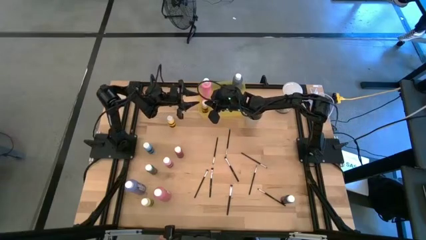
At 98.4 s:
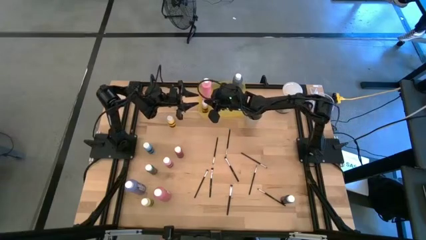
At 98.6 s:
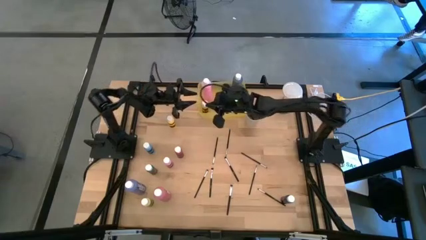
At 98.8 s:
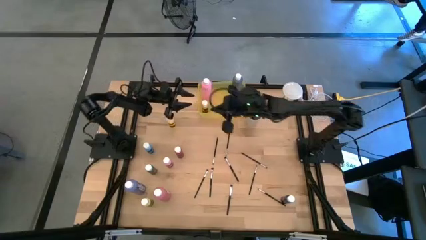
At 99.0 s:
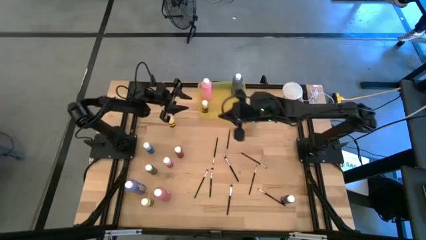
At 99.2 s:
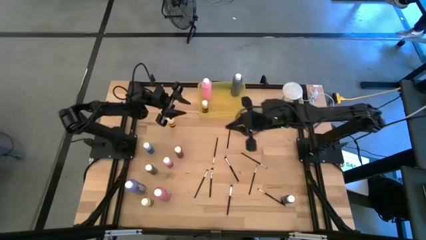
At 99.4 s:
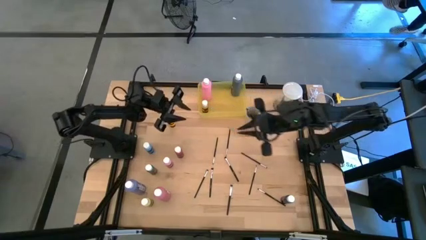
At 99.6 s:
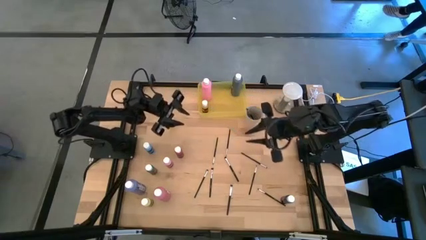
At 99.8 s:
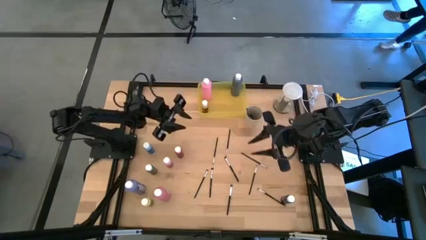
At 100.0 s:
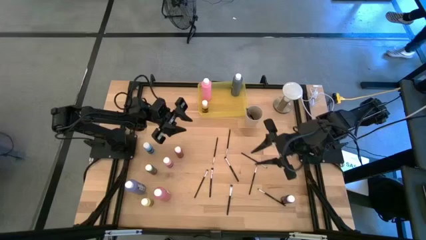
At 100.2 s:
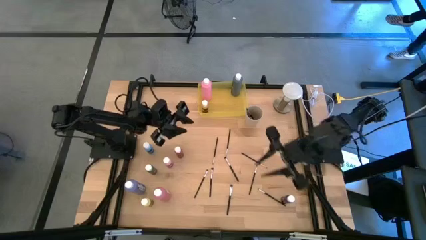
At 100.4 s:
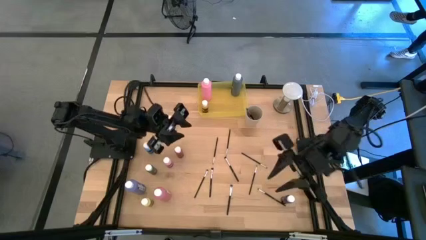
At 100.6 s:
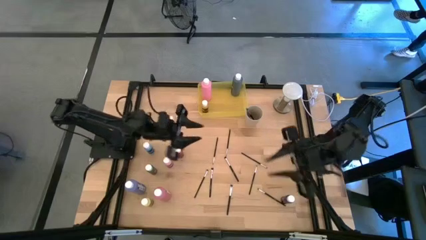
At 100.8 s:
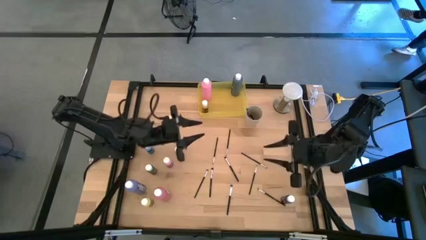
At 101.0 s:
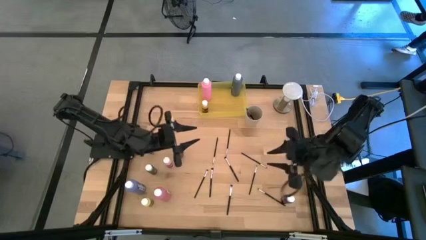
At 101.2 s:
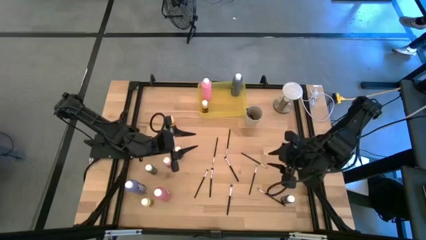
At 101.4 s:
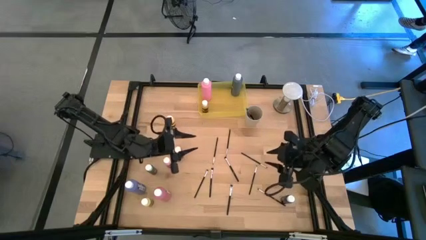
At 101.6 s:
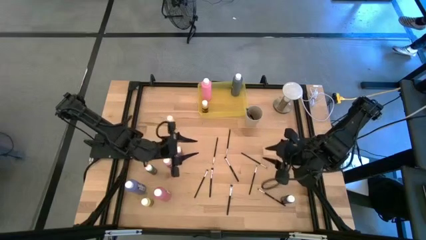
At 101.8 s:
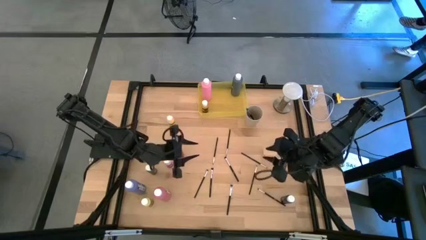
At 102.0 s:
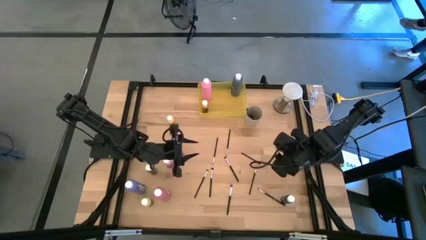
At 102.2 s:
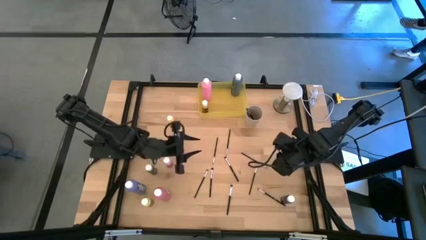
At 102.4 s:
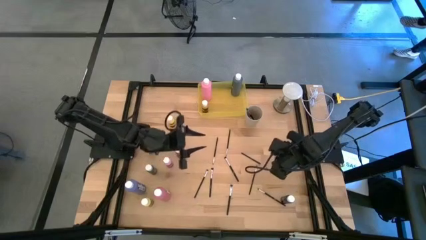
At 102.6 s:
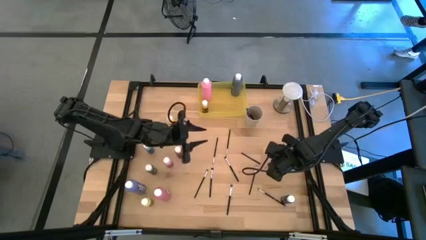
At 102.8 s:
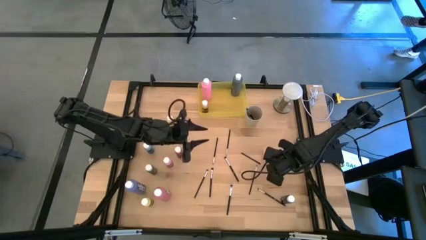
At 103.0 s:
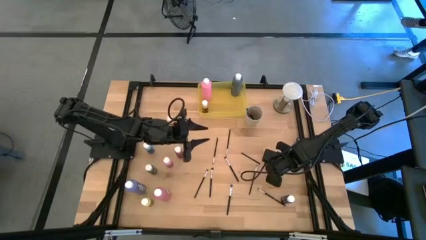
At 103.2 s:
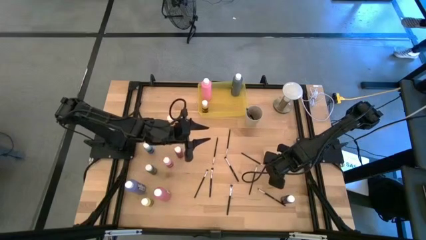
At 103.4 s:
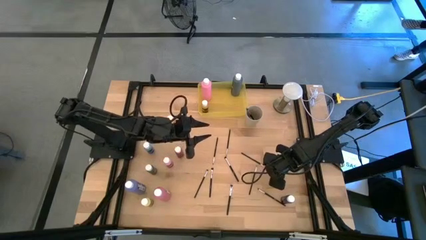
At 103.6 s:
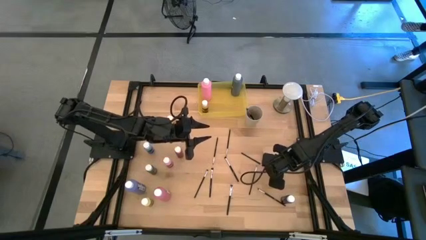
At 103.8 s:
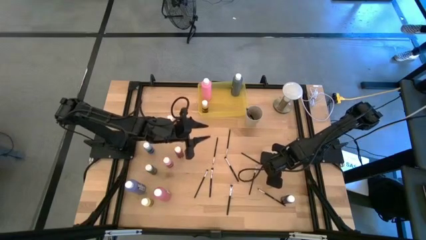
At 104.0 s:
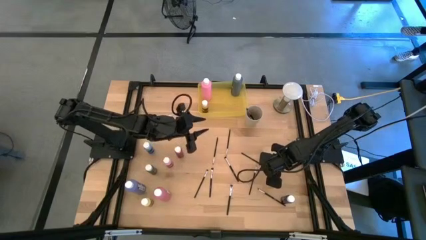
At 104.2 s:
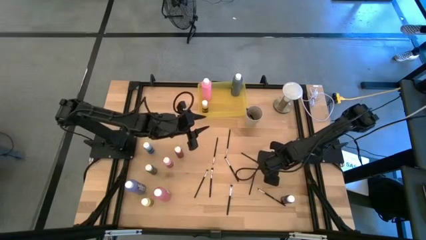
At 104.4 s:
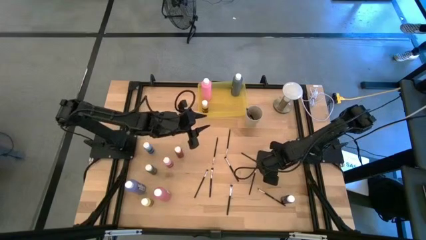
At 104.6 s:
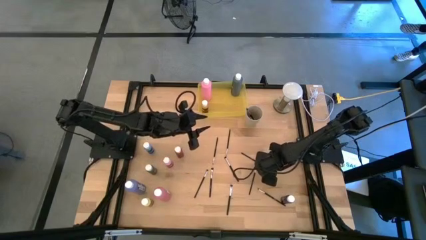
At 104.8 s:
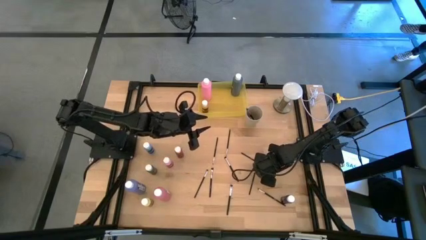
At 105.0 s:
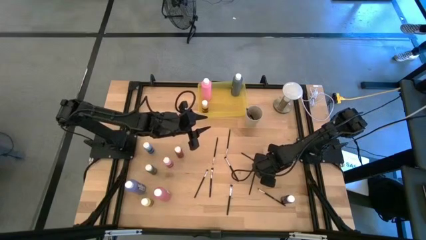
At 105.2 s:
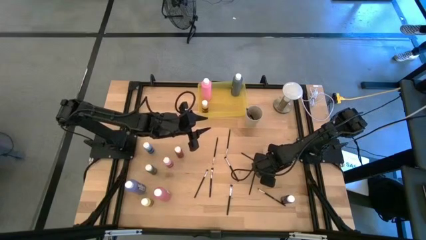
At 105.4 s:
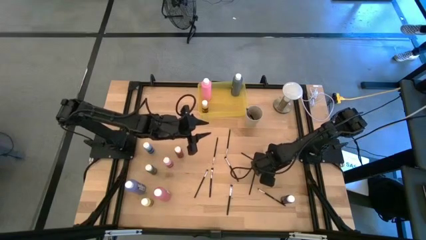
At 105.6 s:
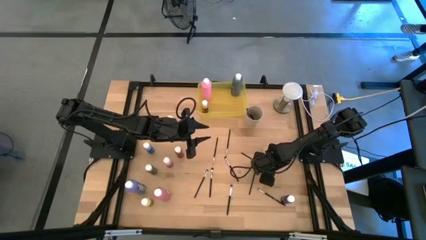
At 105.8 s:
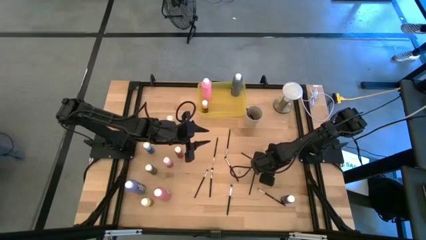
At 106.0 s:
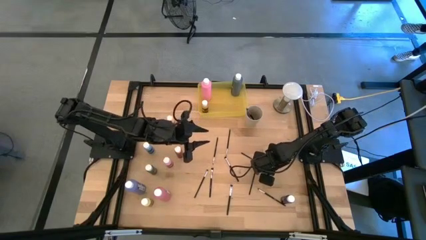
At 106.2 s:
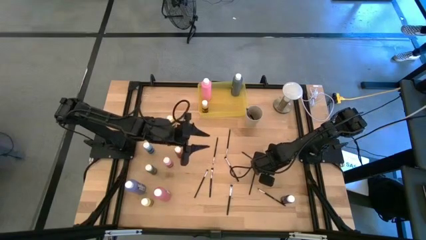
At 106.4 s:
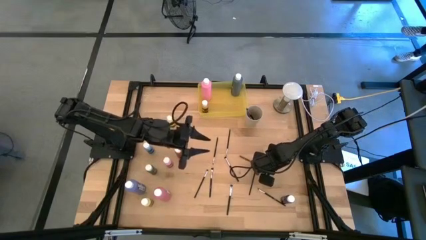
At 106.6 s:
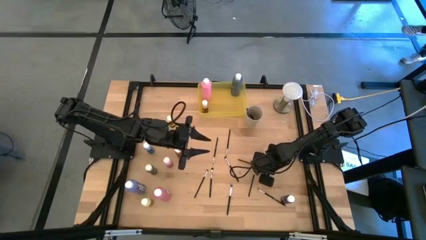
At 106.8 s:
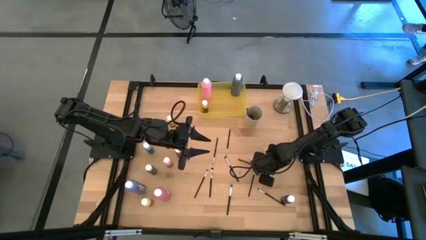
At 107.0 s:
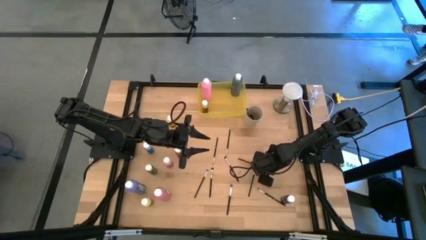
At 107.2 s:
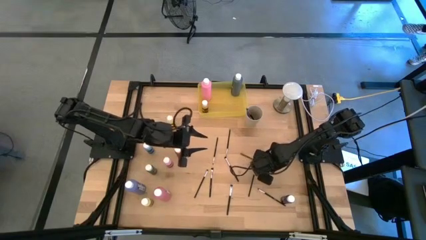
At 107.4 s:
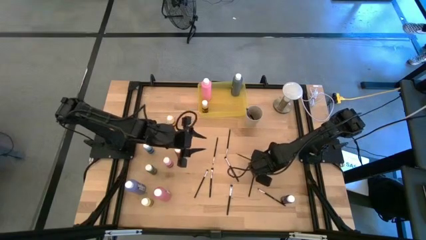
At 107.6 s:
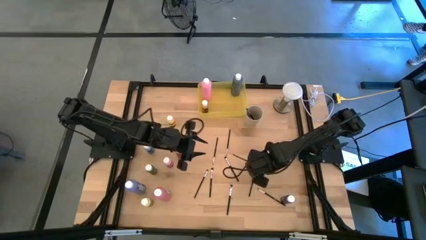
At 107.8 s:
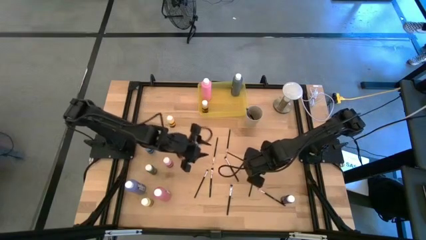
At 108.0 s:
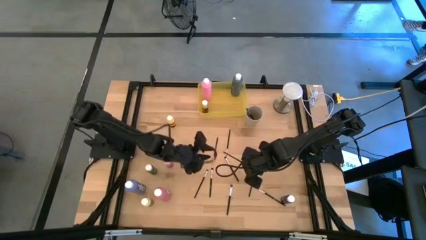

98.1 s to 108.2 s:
Task: Pick & Place Paint Supplies
Put the silver paint brush into the white cup

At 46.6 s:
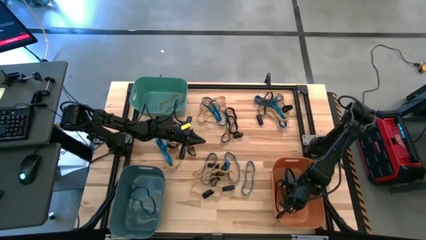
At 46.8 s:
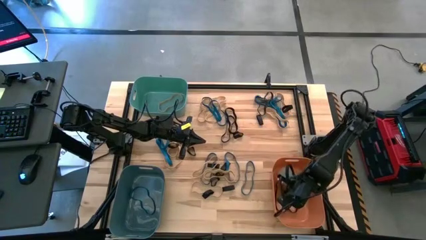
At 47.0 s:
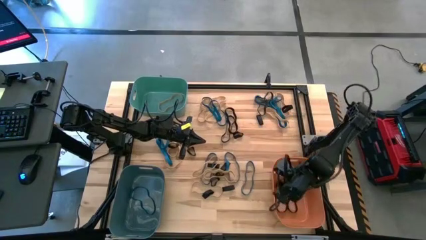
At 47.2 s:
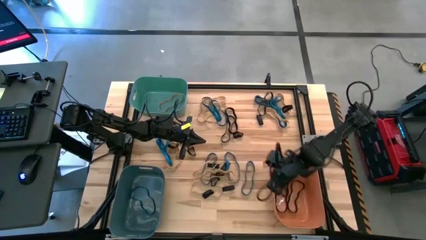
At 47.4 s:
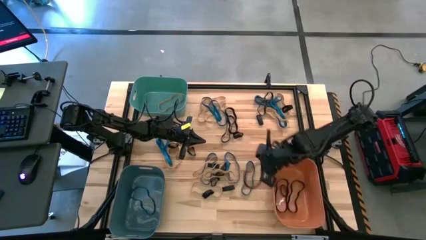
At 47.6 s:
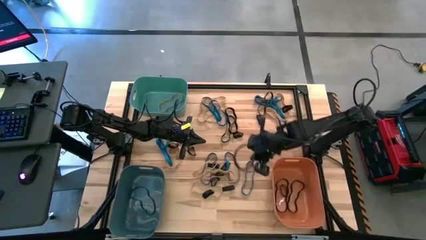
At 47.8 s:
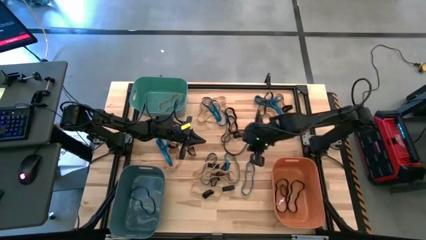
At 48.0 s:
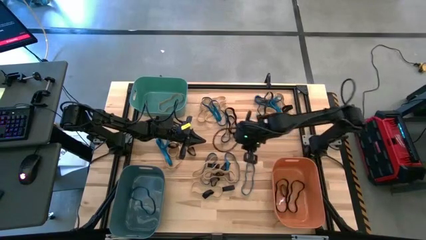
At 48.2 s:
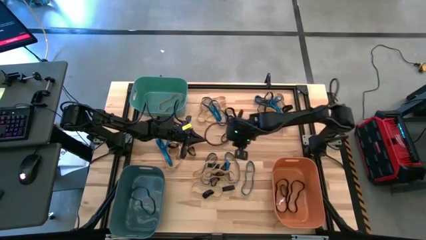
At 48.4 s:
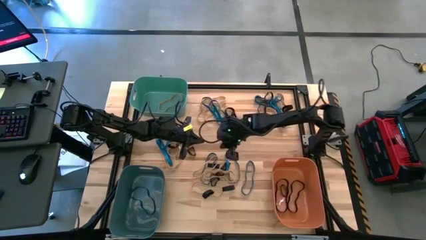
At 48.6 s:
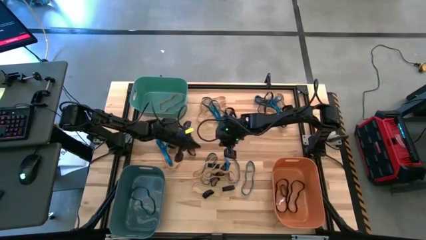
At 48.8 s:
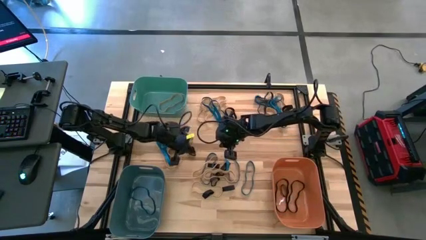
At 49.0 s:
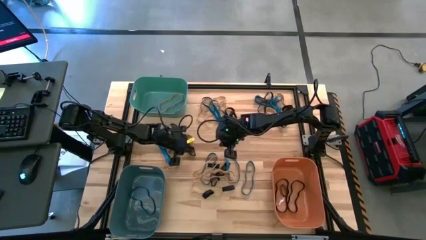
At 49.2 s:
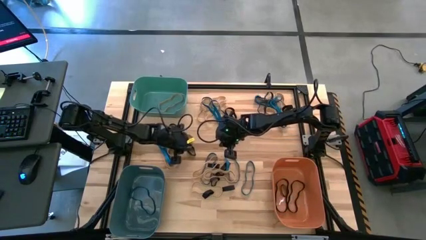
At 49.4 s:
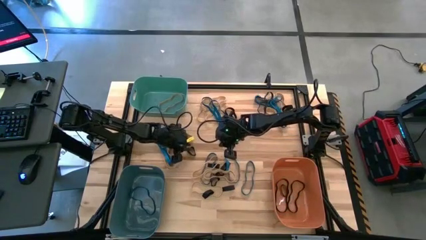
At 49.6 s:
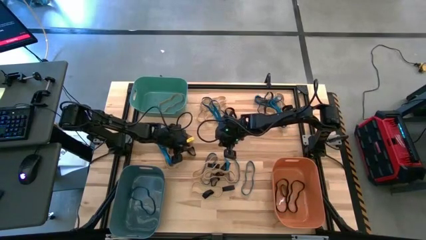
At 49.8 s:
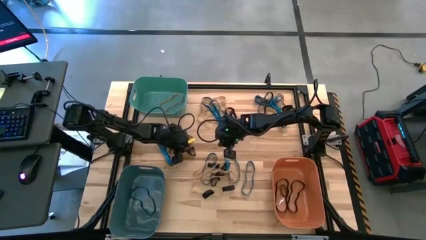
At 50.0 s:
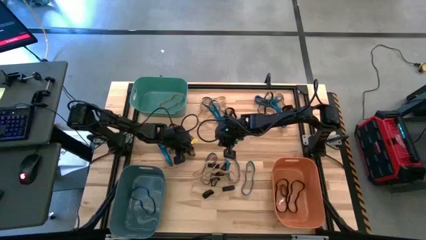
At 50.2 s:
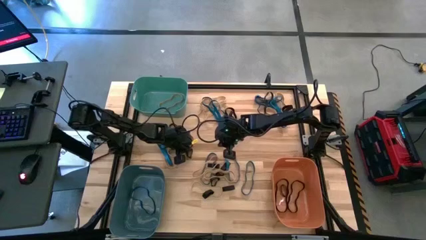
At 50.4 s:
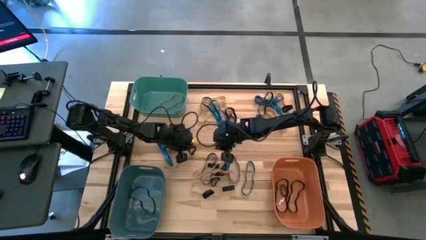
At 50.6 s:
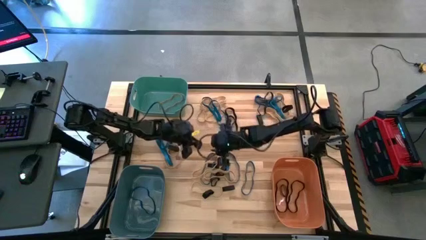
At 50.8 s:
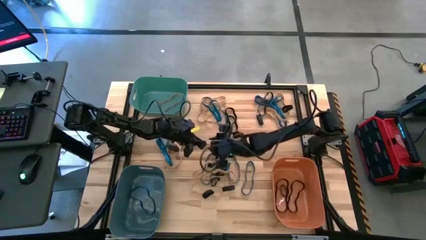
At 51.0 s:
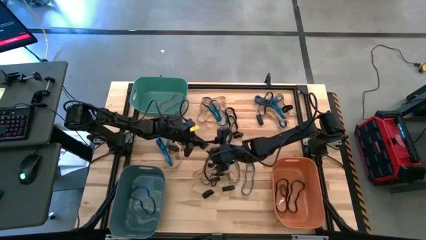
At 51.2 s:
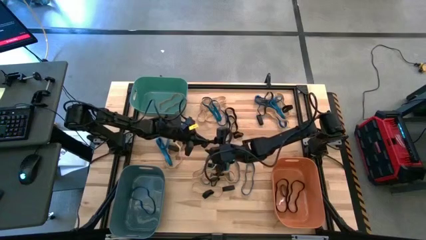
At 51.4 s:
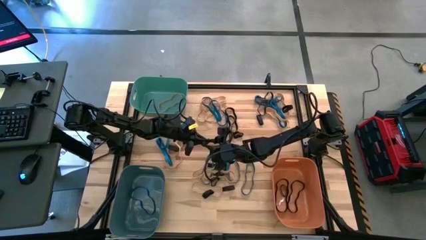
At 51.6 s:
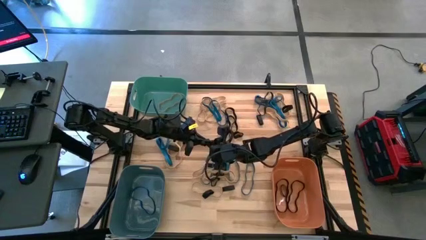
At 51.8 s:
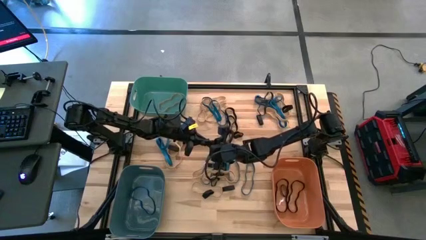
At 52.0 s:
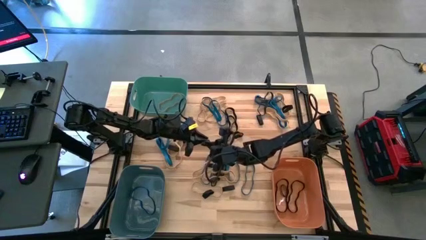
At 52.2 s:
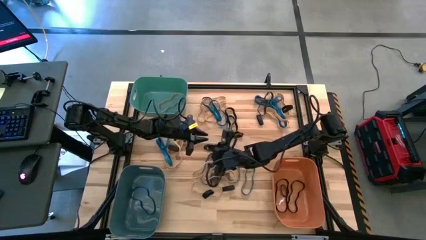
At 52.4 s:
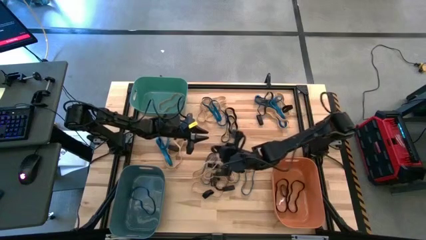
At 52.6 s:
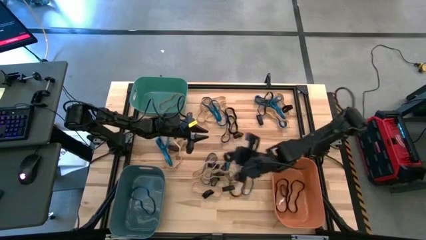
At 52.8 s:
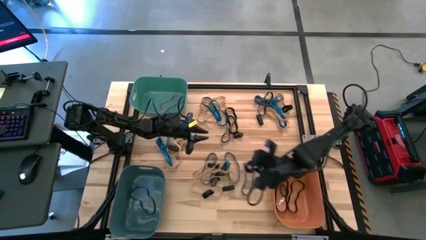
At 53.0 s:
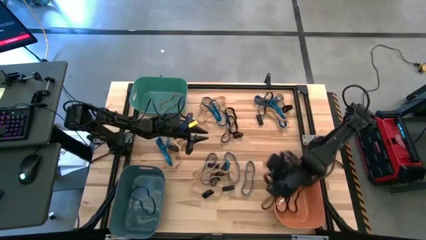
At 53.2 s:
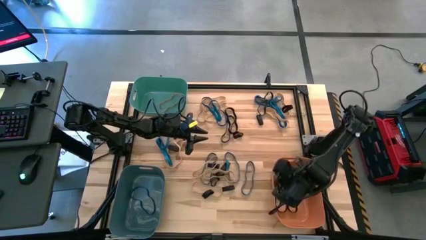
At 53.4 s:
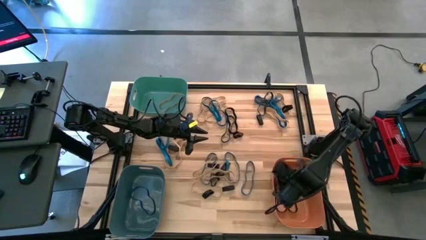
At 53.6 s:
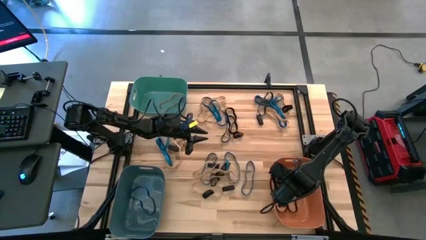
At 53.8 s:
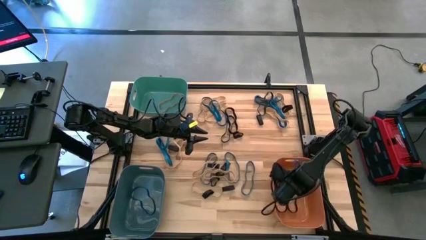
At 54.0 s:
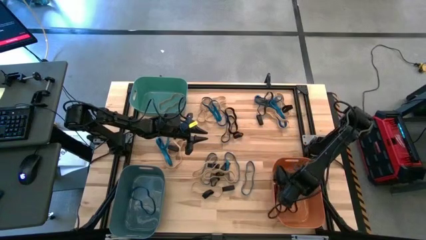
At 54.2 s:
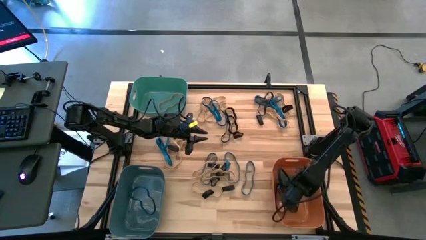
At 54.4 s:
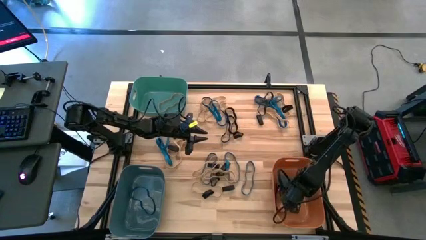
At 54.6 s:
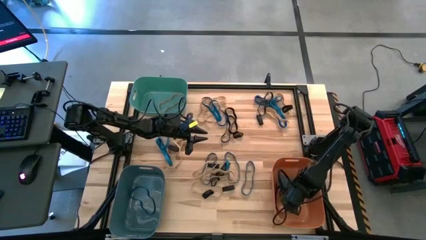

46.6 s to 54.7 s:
Task: Sort rubber bands into baskets
Put the black rubber band into the orange bin
